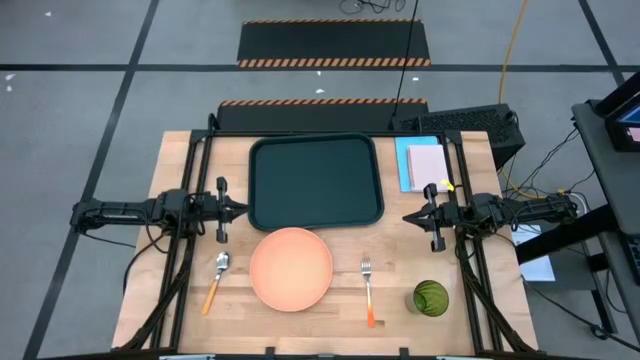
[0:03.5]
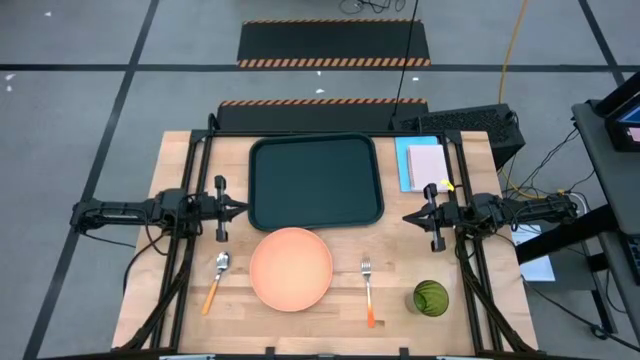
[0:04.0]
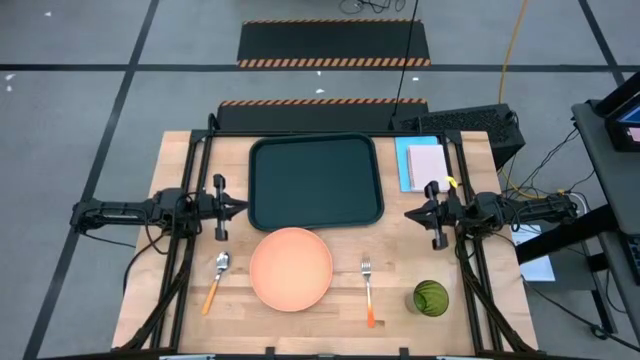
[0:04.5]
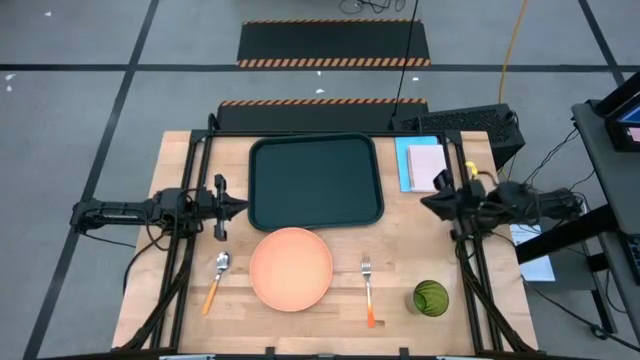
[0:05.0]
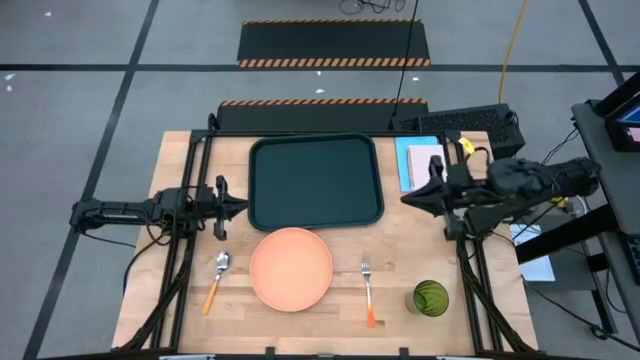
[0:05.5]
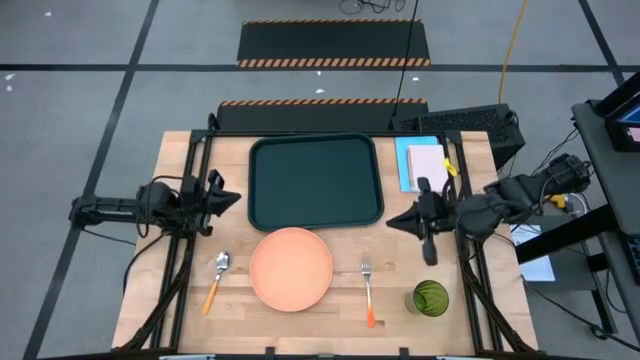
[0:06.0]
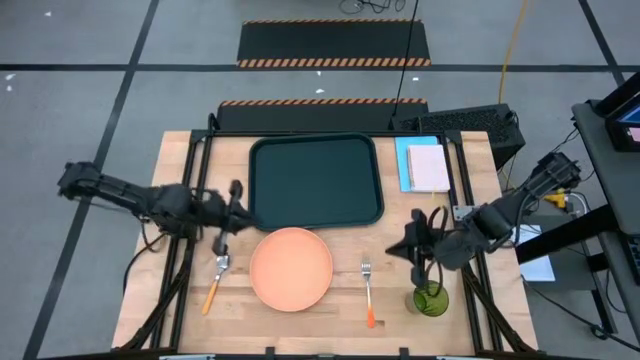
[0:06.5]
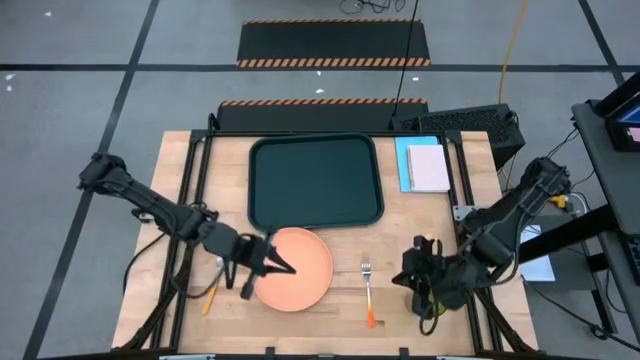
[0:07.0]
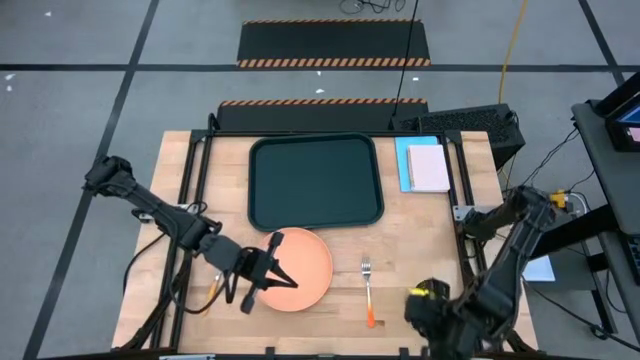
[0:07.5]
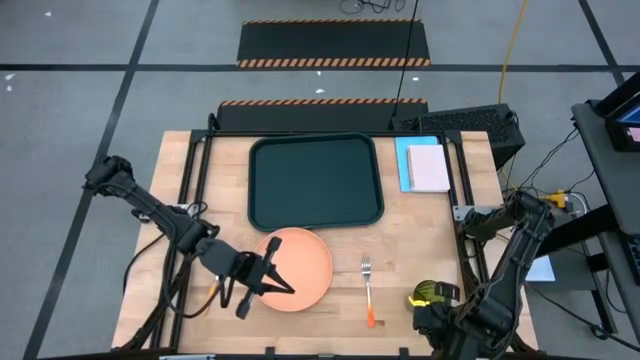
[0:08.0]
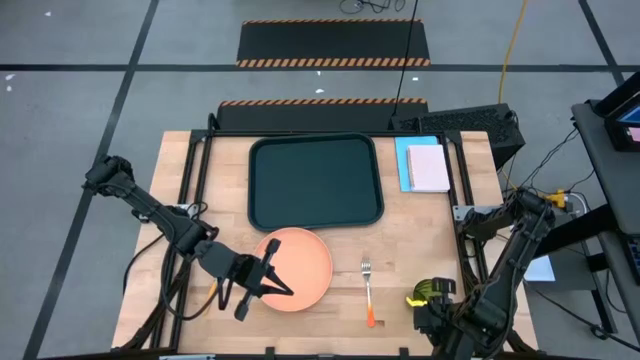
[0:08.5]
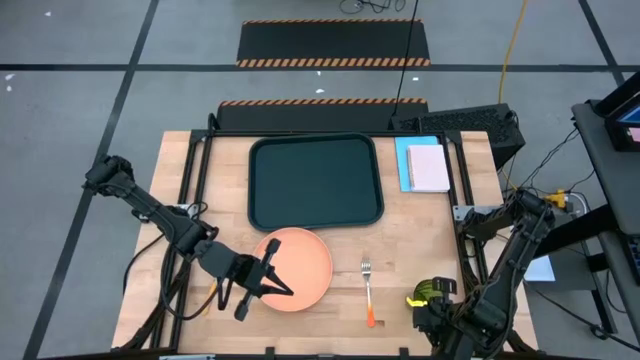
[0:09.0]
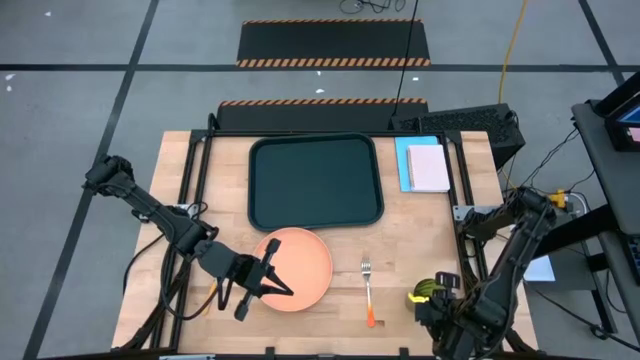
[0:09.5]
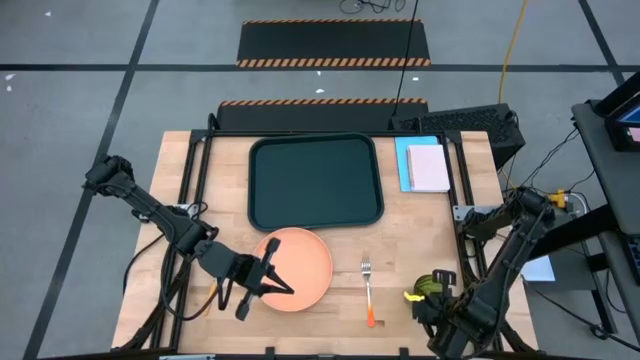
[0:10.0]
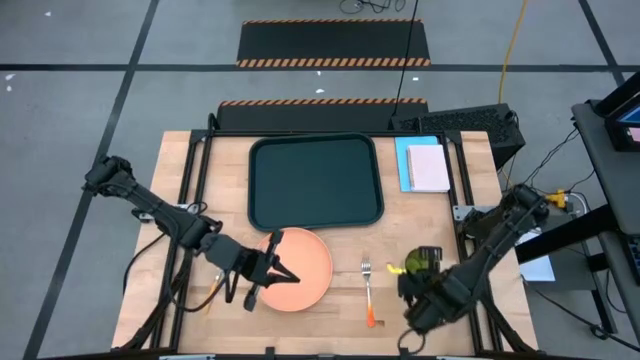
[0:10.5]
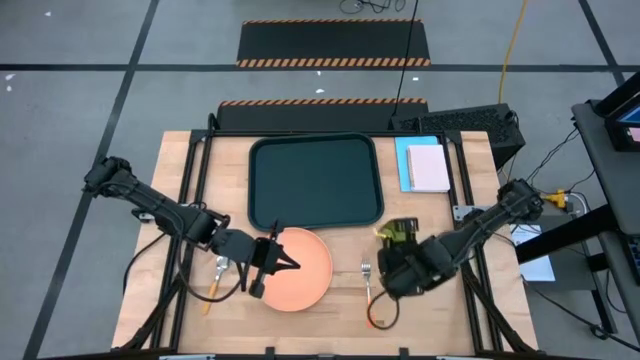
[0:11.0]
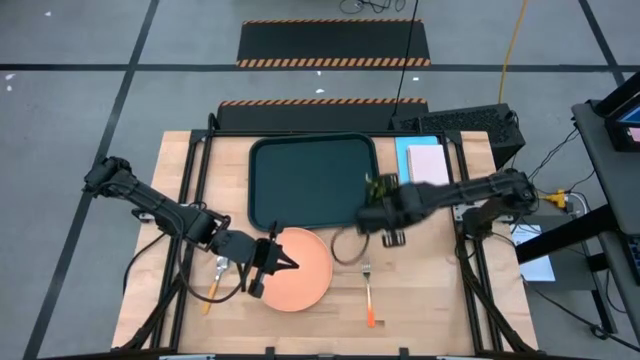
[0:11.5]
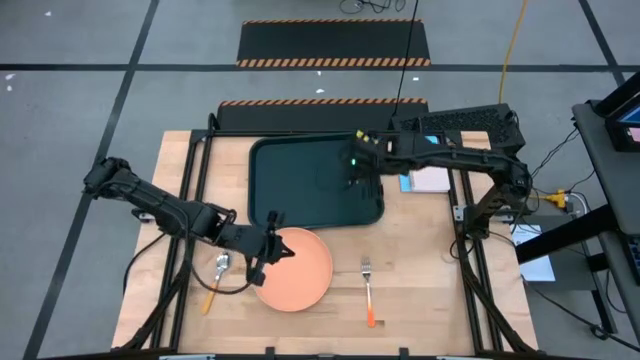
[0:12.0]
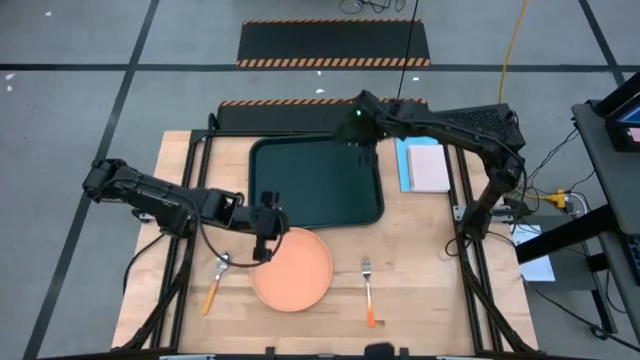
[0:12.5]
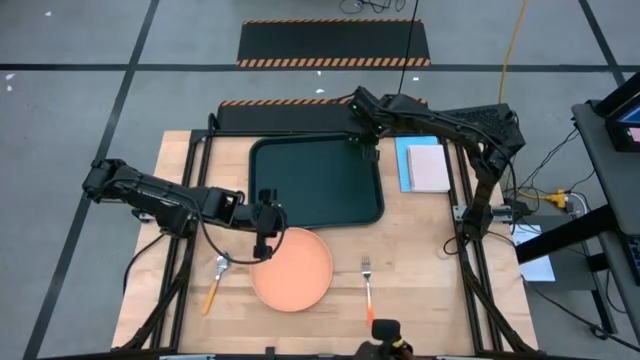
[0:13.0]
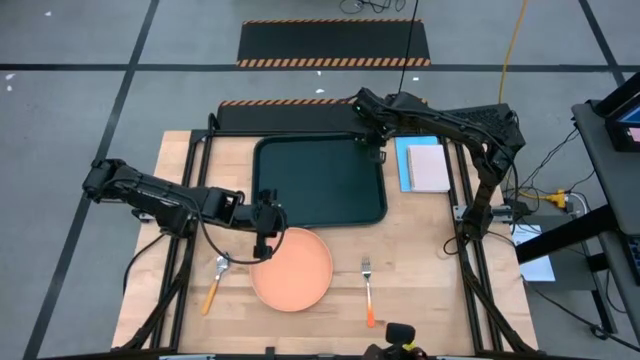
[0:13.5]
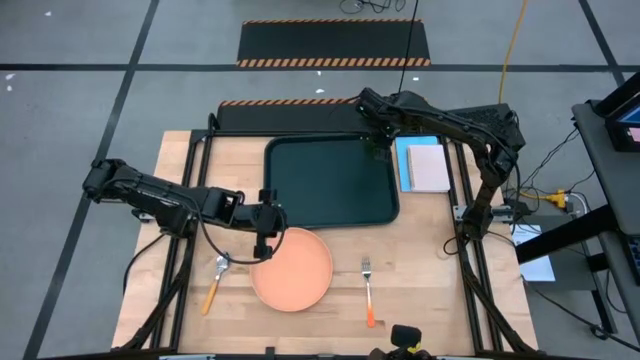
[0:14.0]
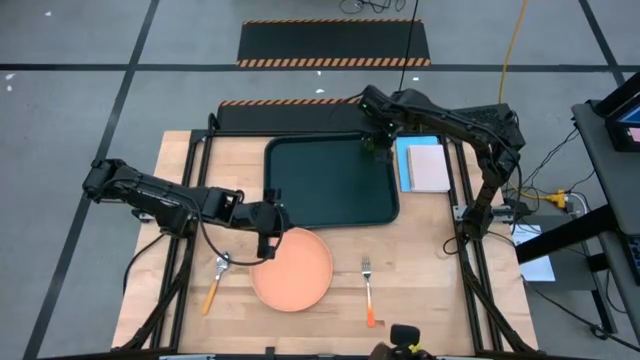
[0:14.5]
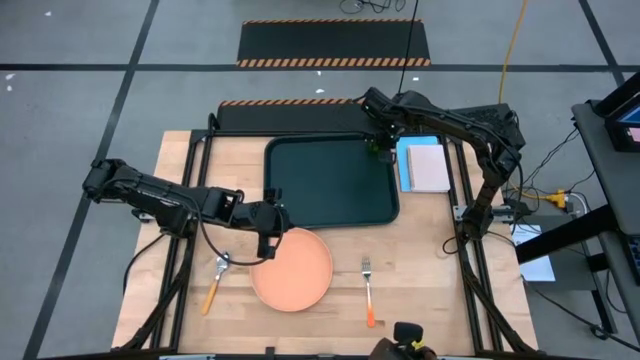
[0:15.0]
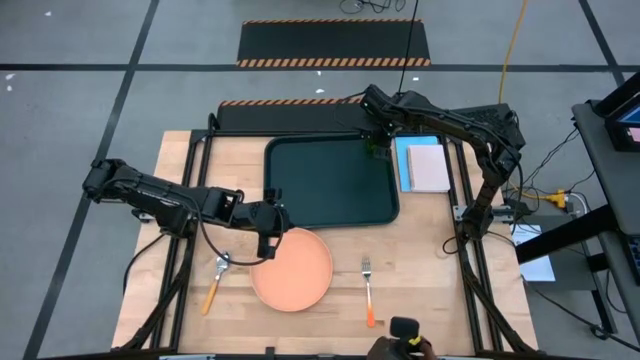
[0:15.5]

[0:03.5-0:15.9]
Task: Pick and place plate/cup/fork/spoon on tray
Put the green cup on the black serving tray

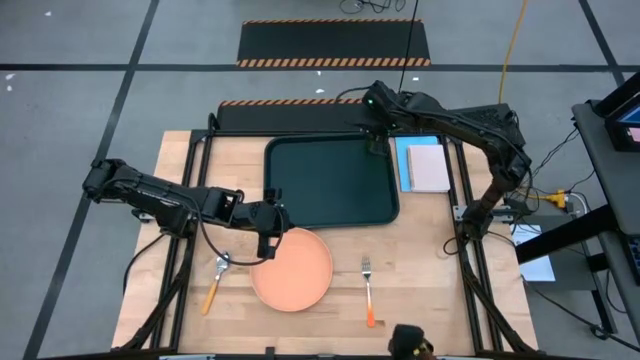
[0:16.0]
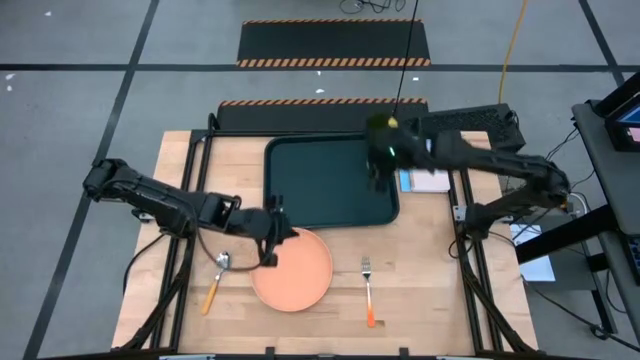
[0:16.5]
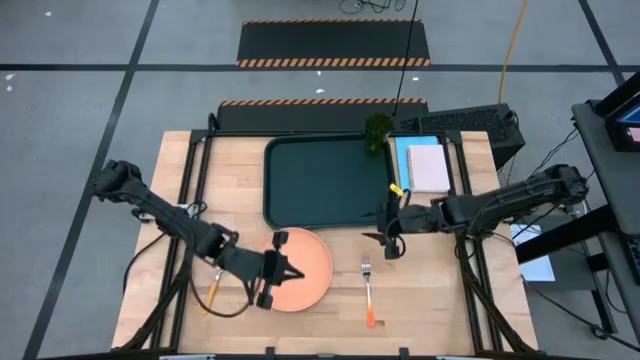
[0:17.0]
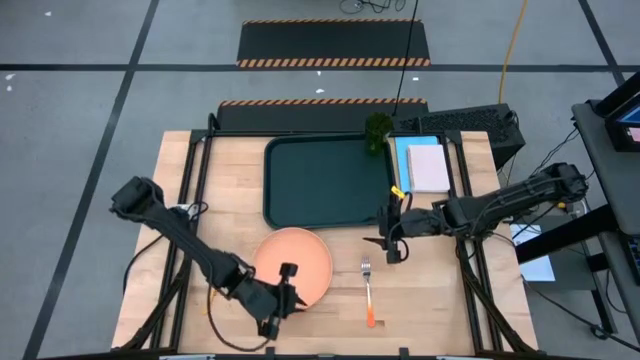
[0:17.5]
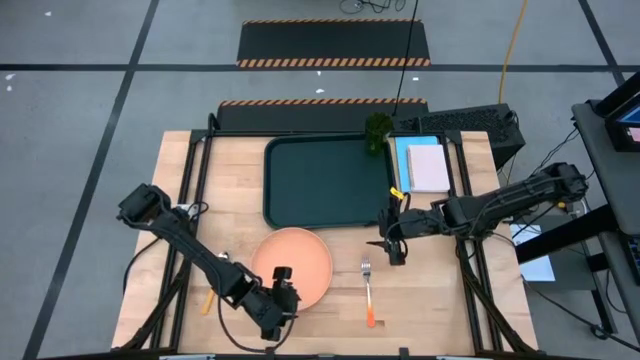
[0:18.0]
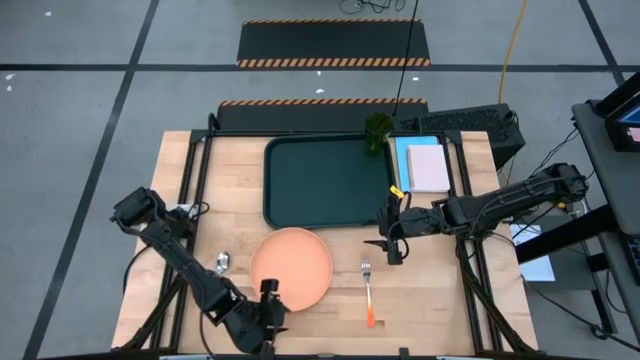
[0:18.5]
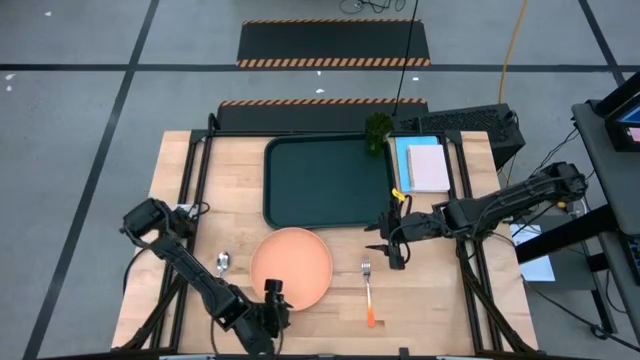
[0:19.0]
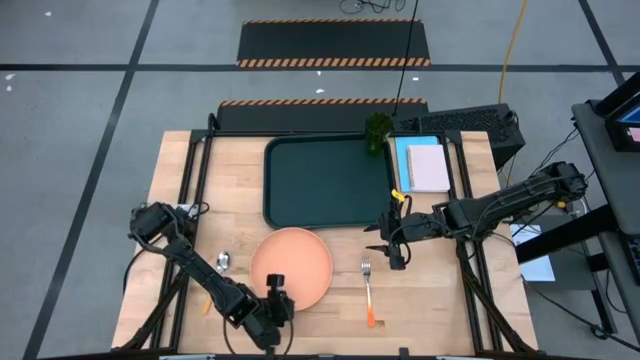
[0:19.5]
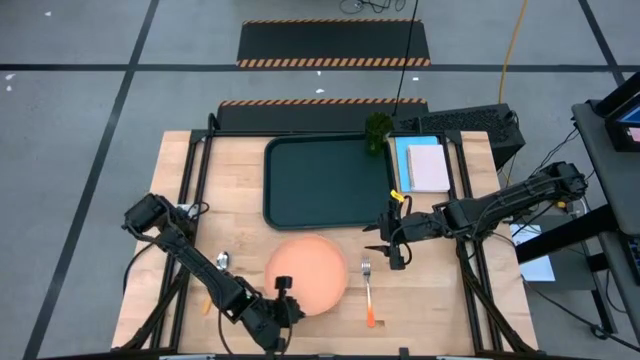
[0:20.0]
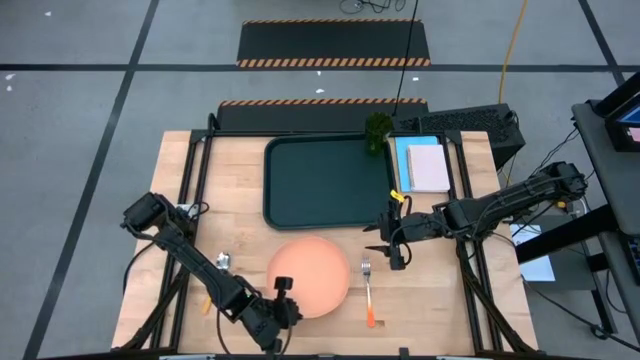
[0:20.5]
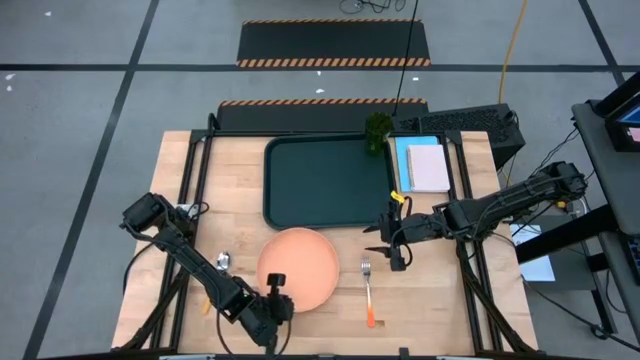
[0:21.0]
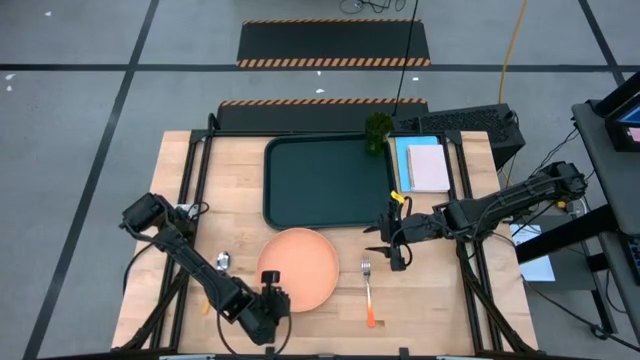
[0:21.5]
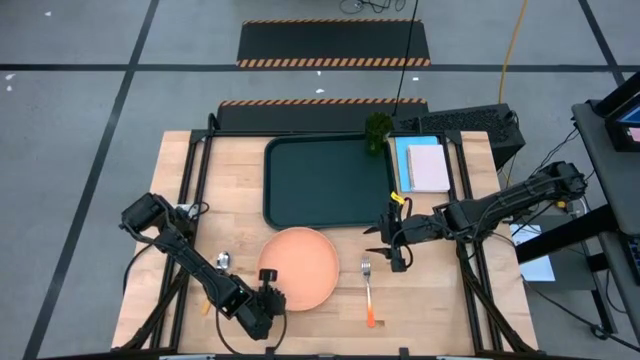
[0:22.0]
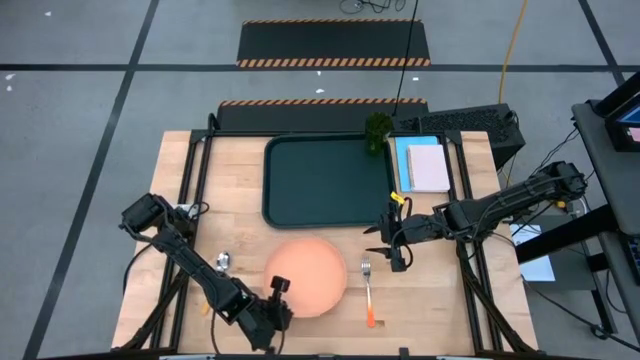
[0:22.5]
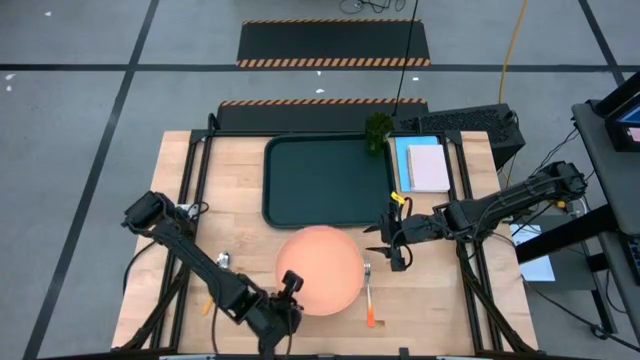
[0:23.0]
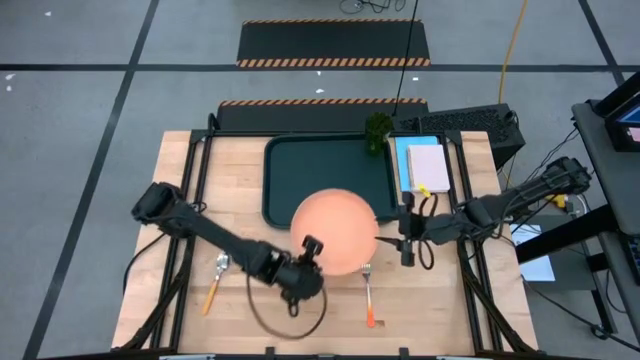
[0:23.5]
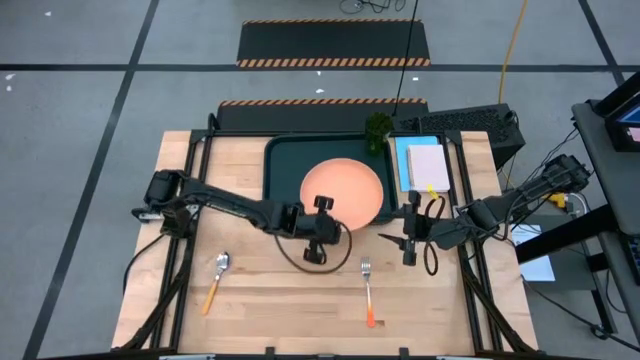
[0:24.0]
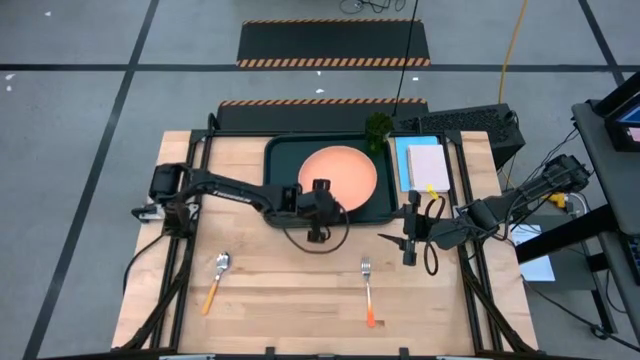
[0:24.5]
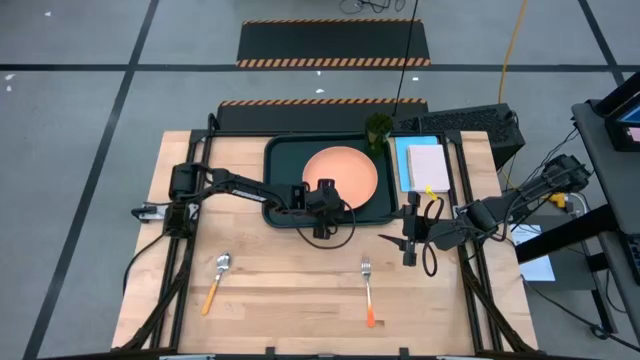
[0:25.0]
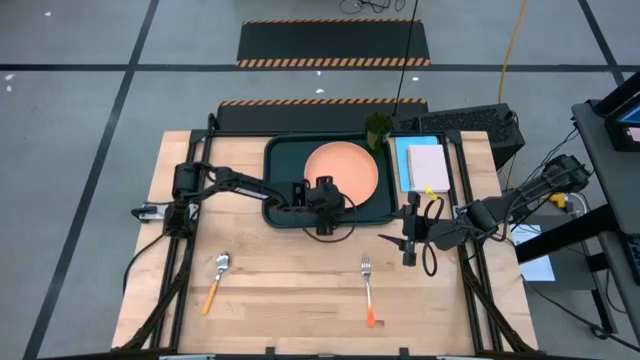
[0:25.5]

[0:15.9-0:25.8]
Put the orange plate on the black serving tray to the bottom left of the green cup
